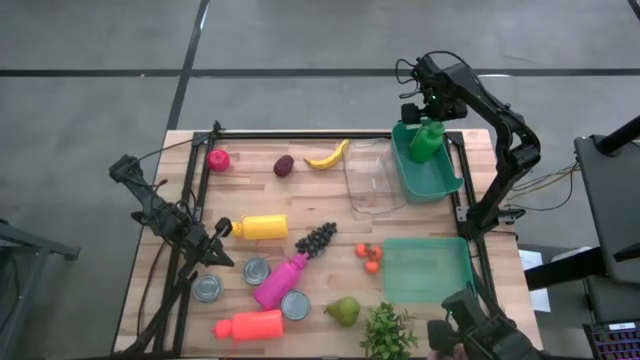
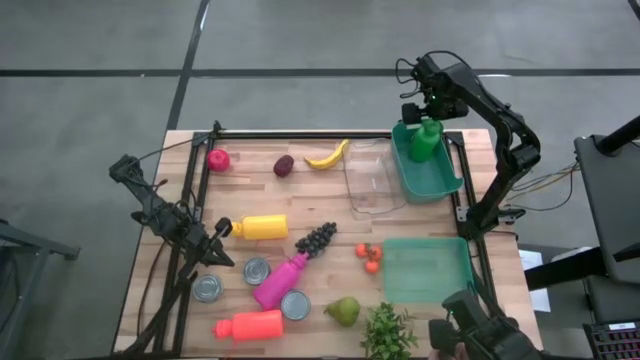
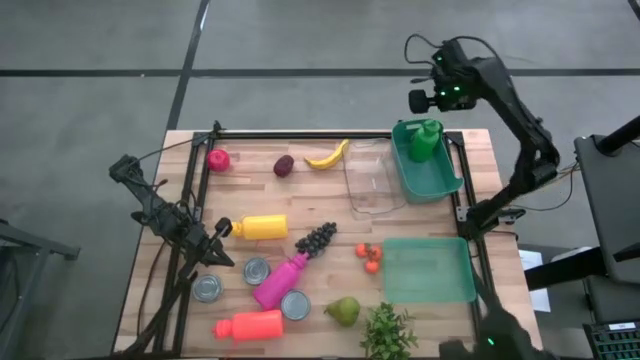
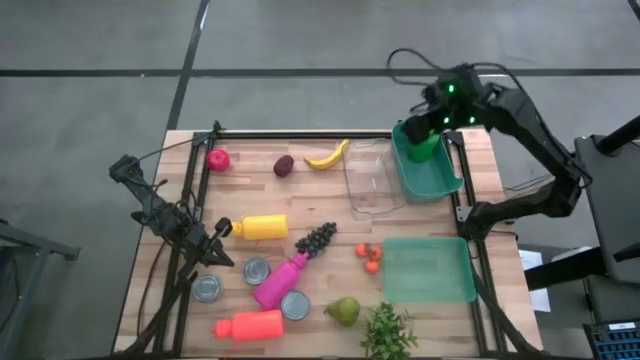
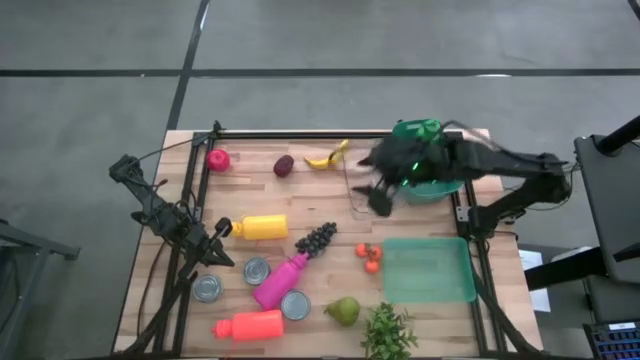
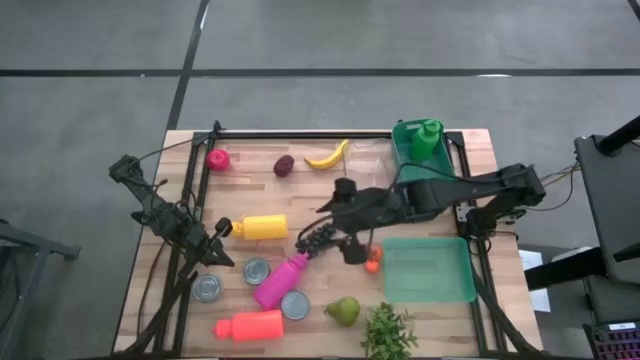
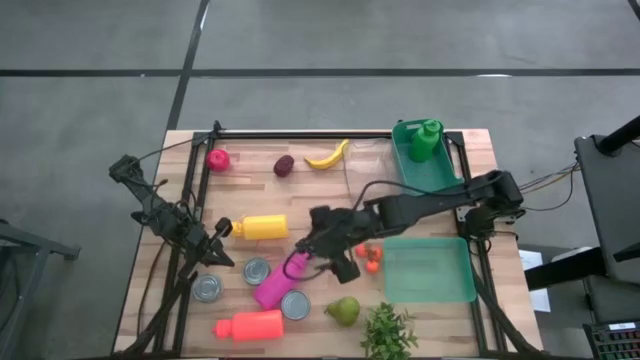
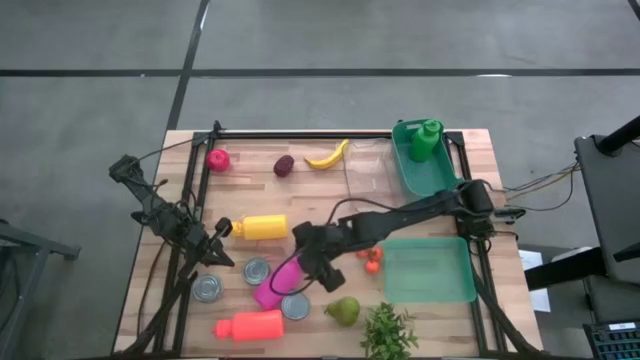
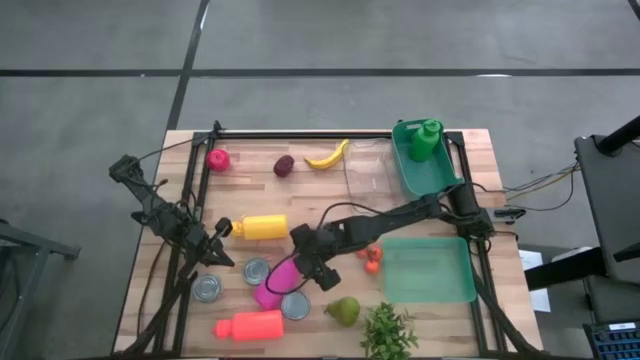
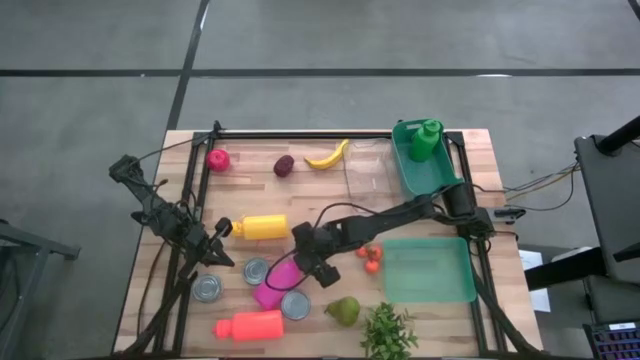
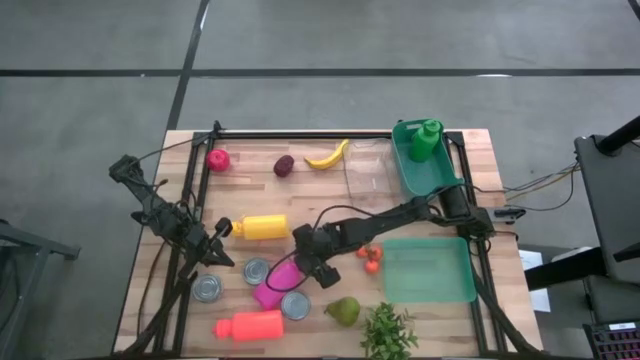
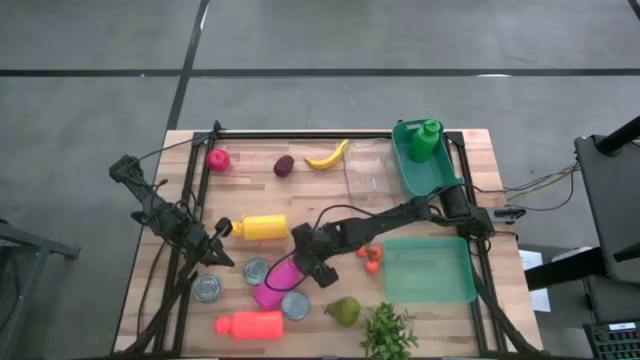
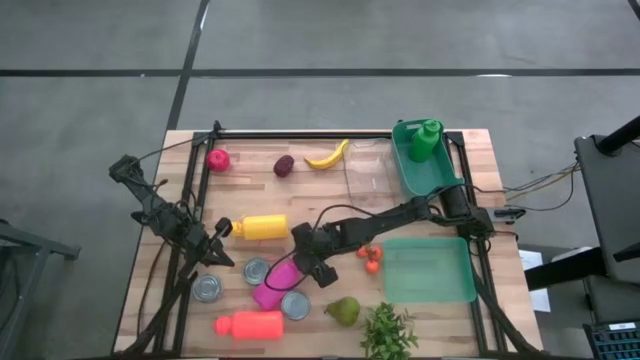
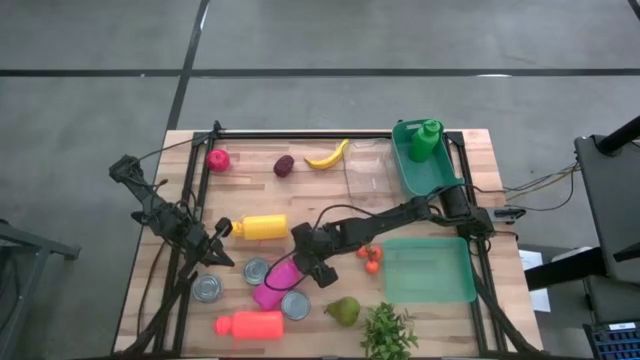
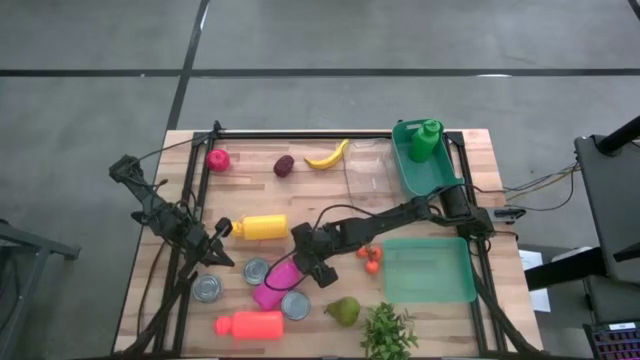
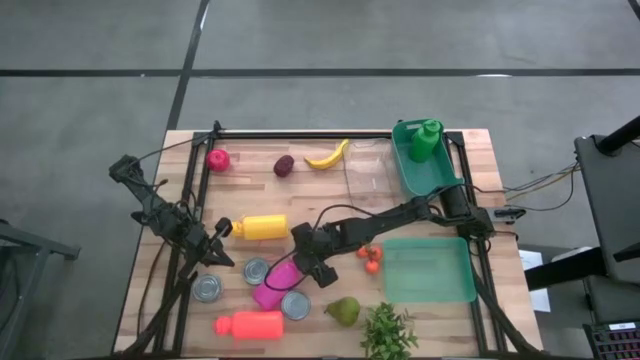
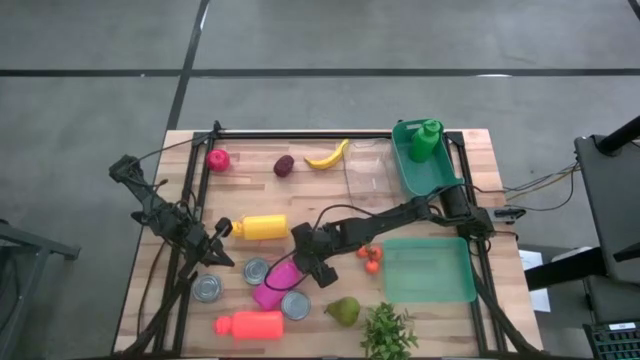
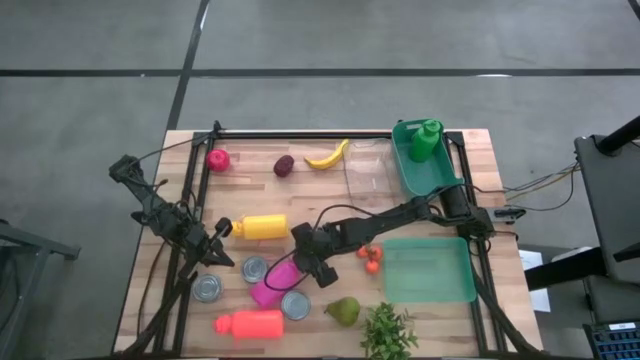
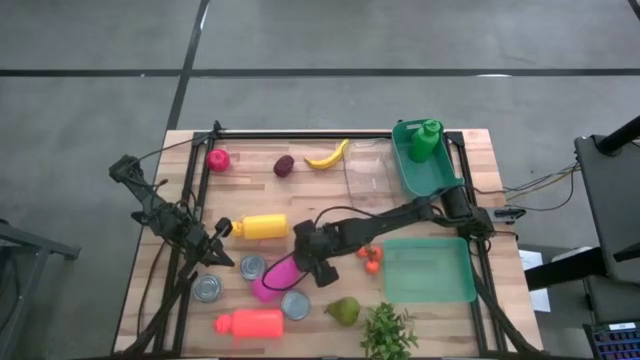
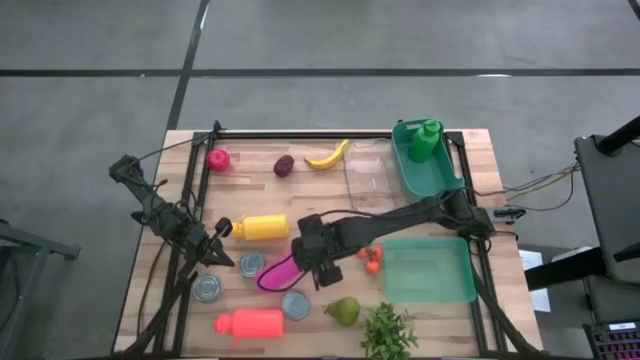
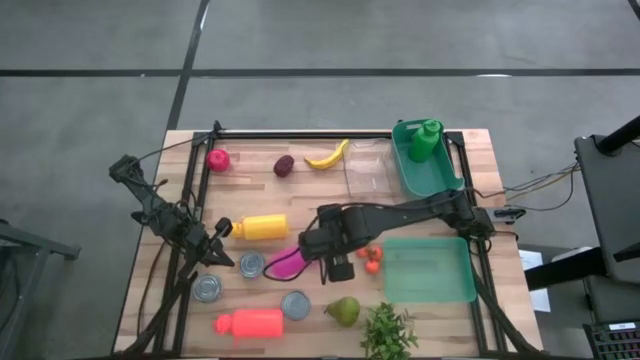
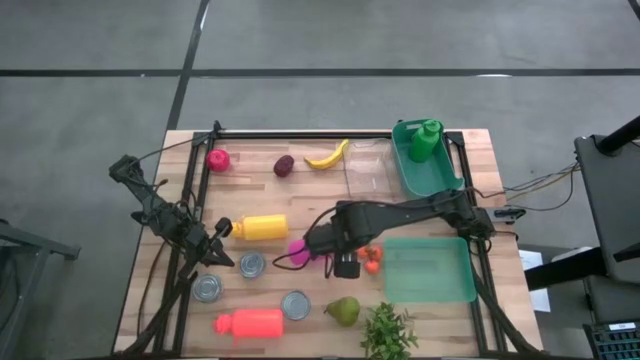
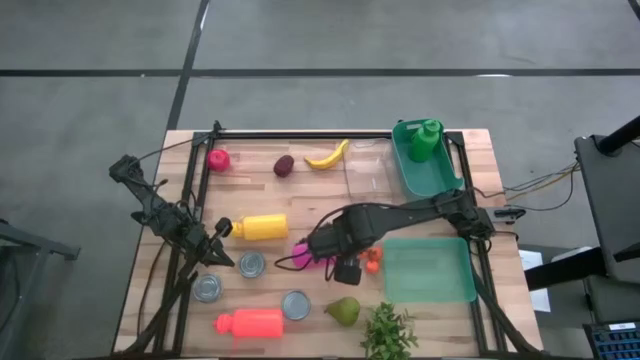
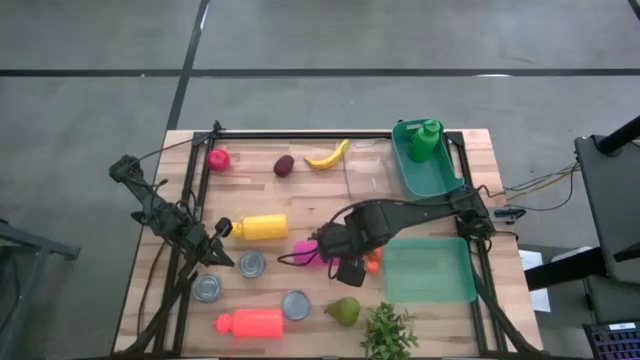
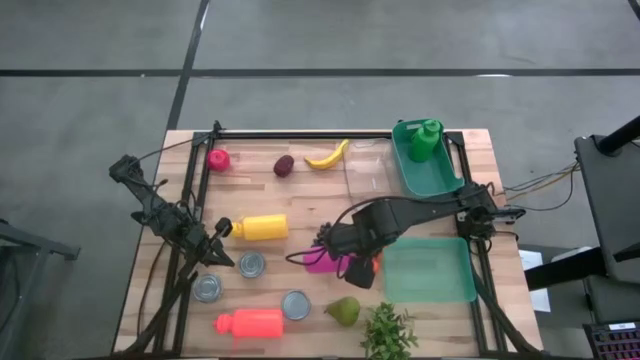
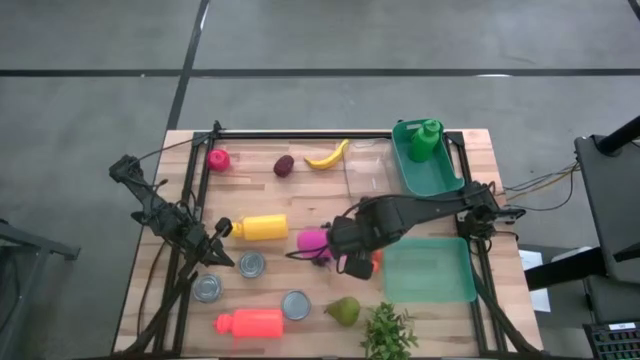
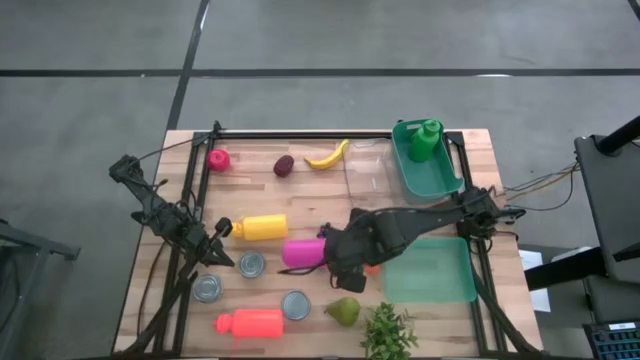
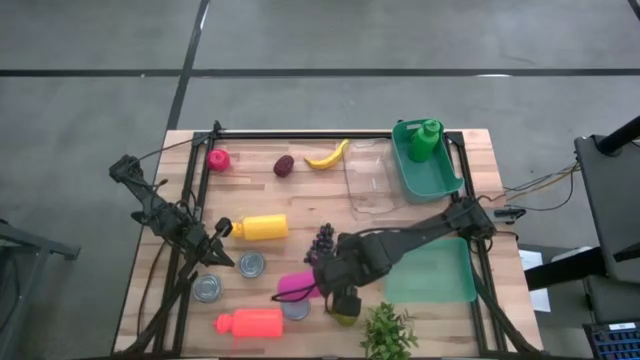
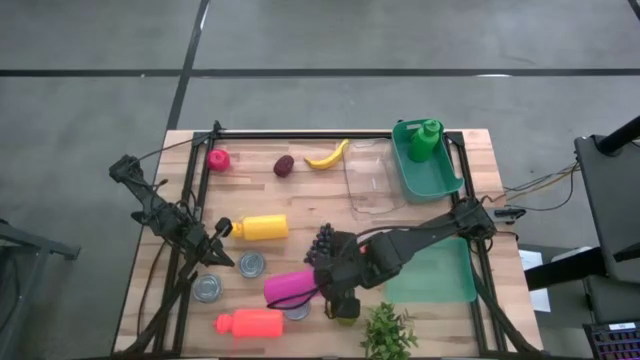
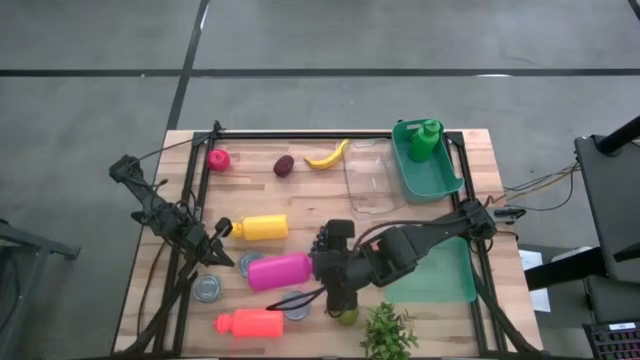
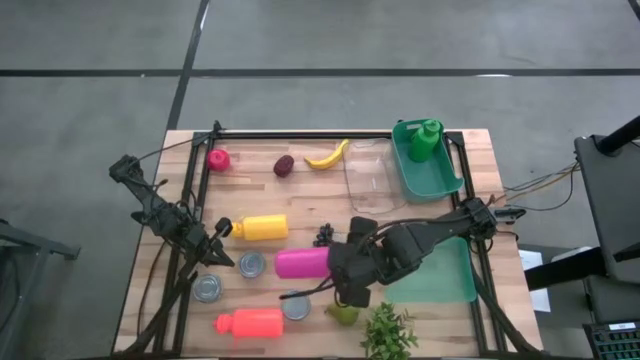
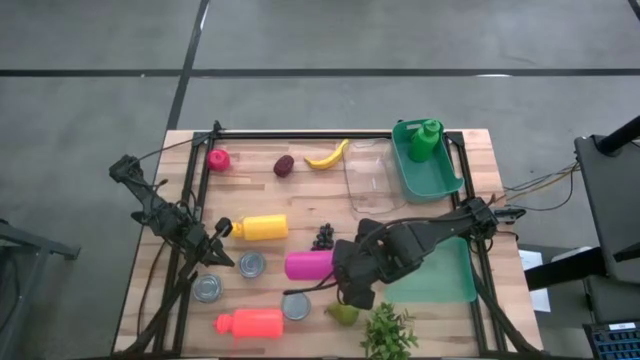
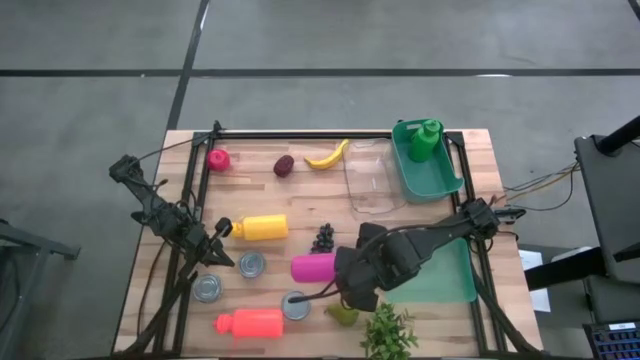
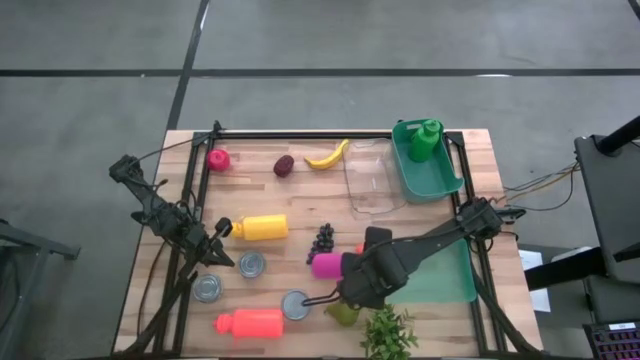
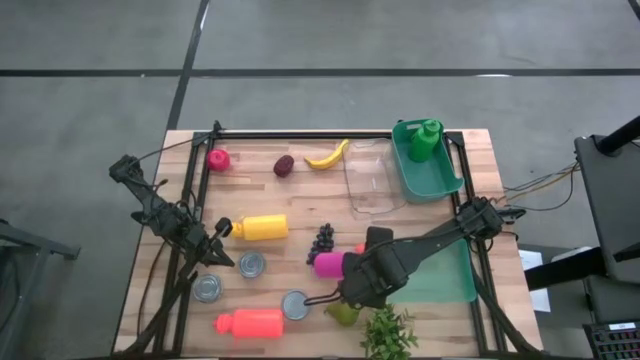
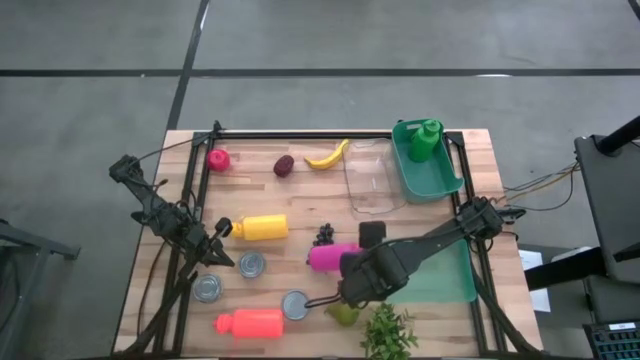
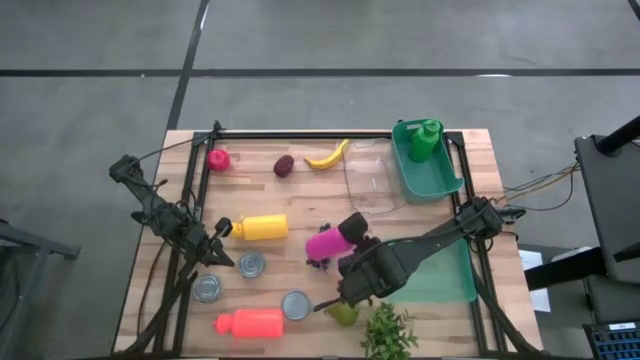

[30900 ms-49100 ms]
Task: Pick & Place Food Item
Put the pink water bottle into the green bin

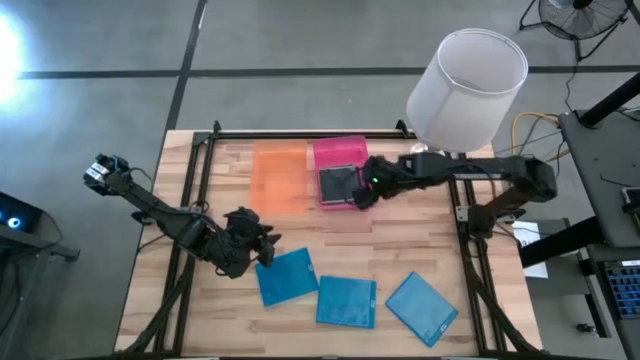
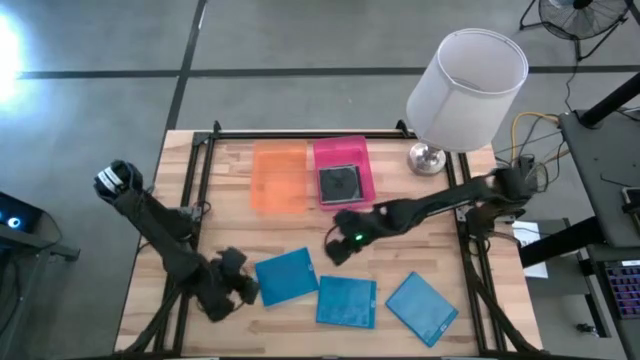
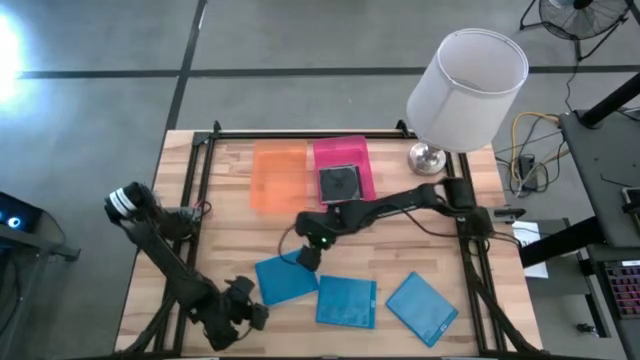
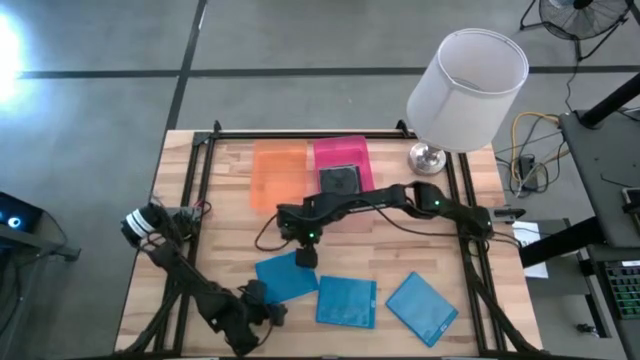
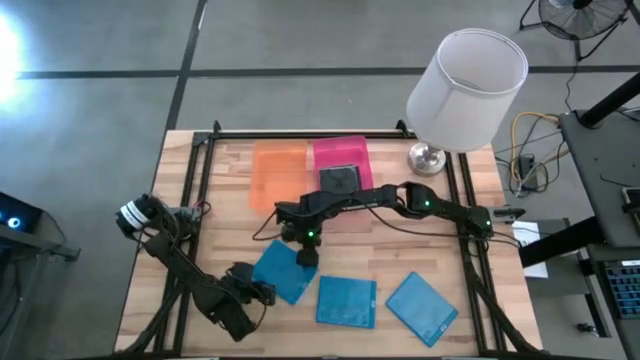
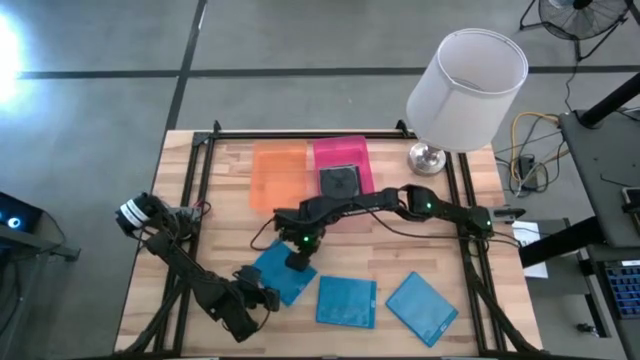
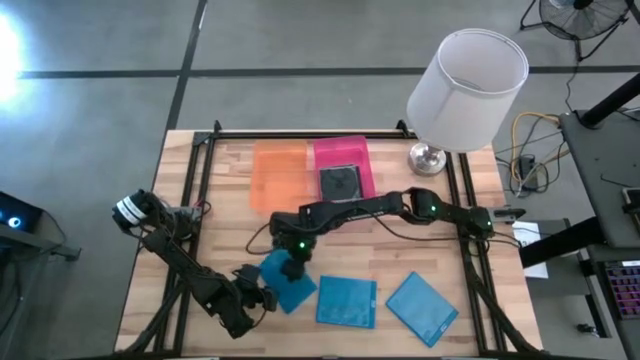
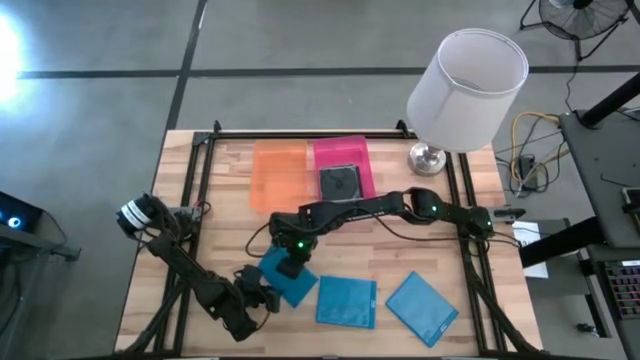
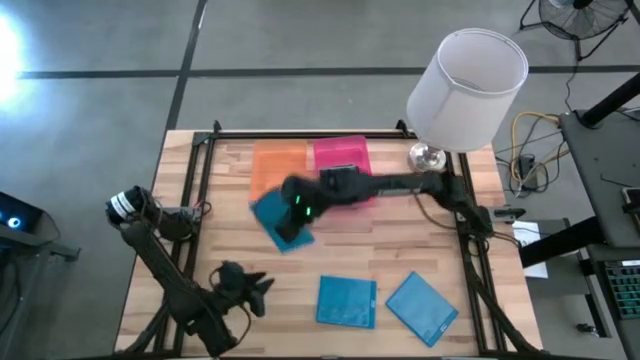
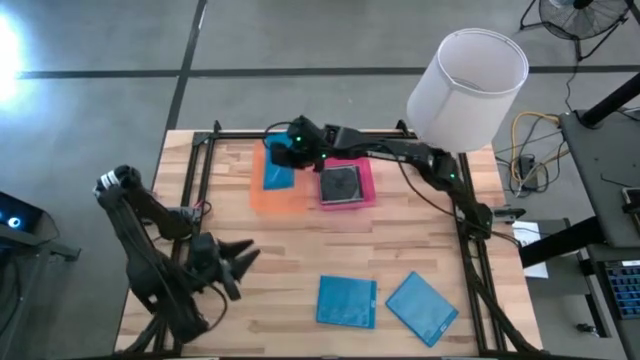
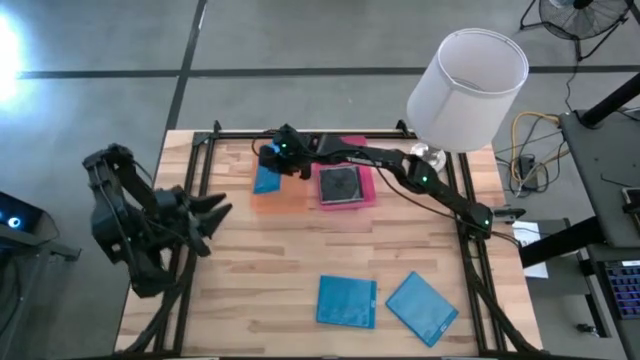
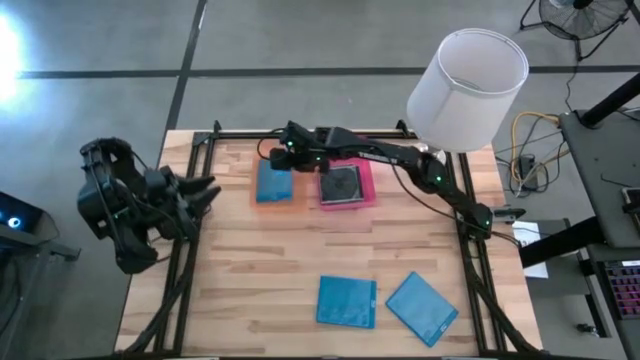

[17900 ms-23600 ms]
Task: Pick & place jewel cases by type
Put the left blue CD case into the orange bin
